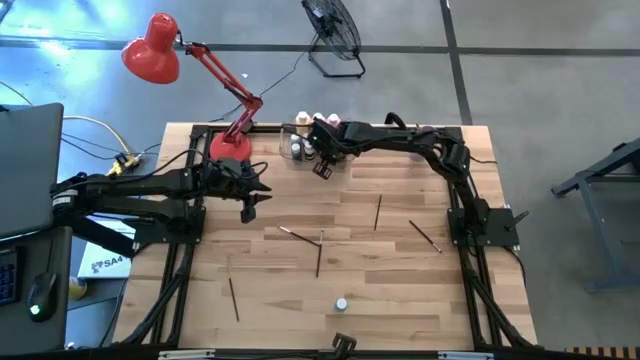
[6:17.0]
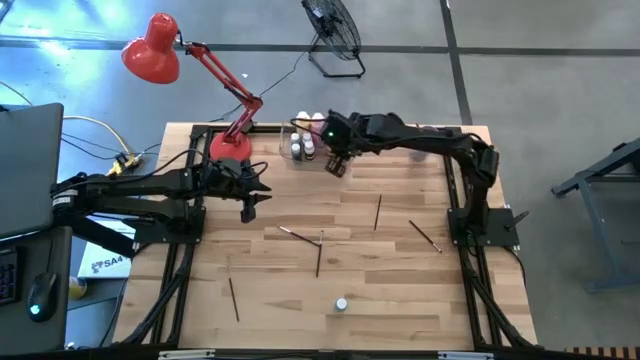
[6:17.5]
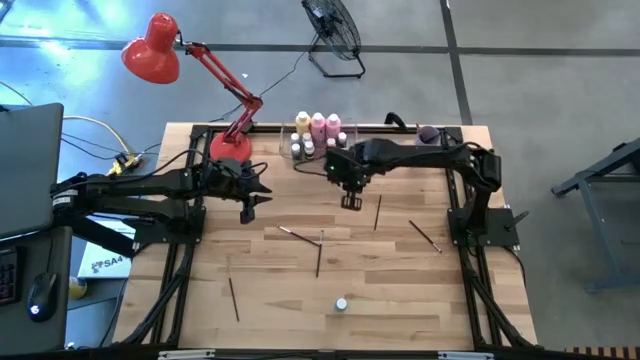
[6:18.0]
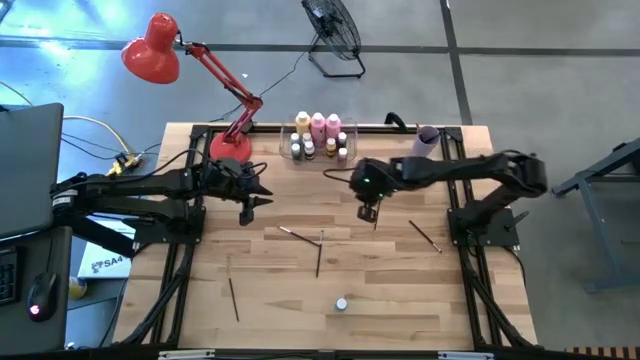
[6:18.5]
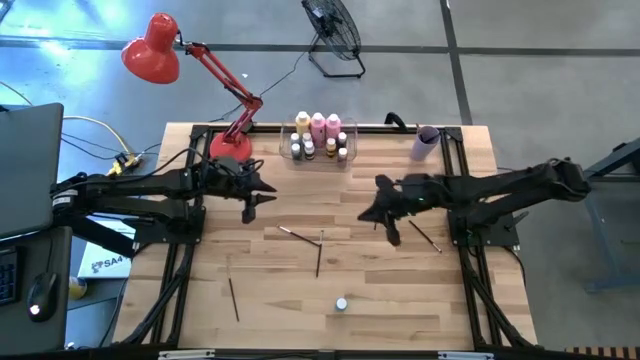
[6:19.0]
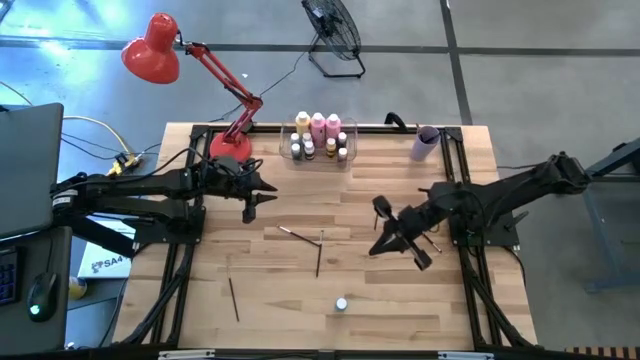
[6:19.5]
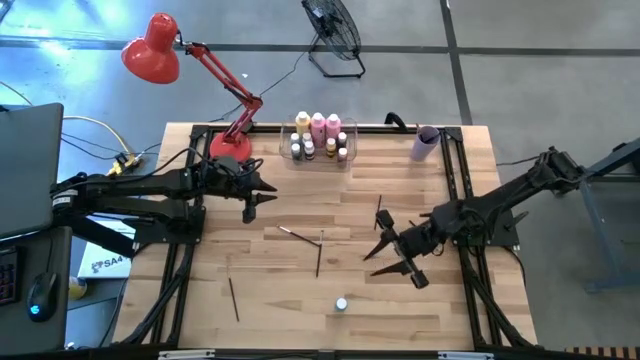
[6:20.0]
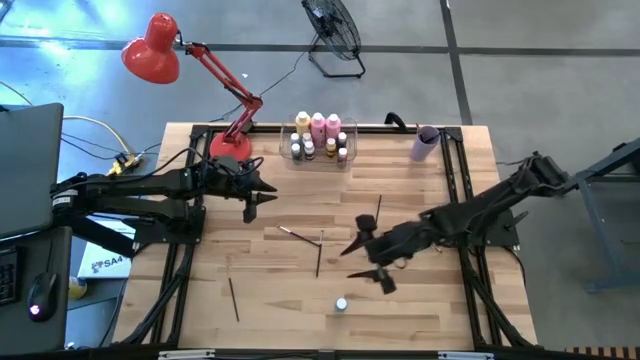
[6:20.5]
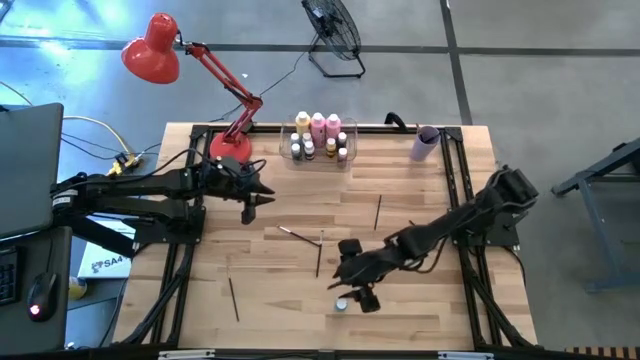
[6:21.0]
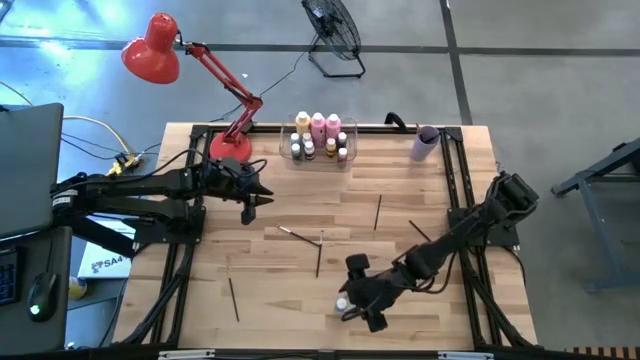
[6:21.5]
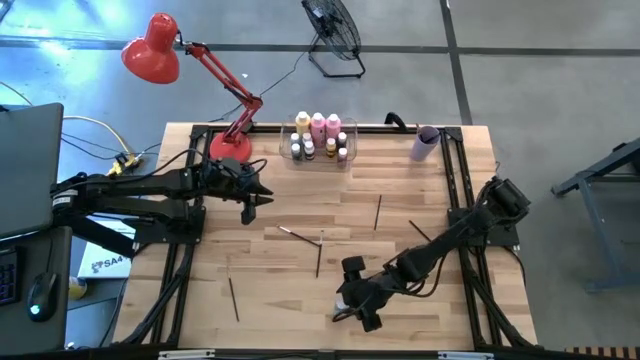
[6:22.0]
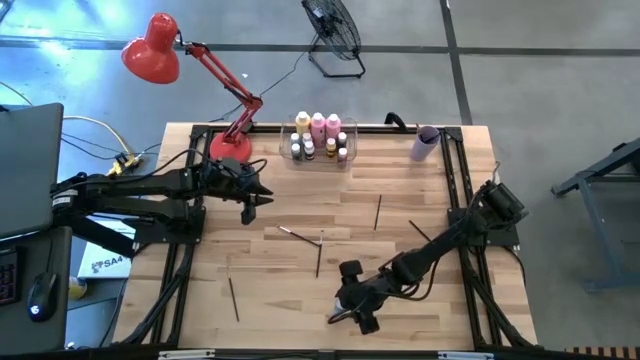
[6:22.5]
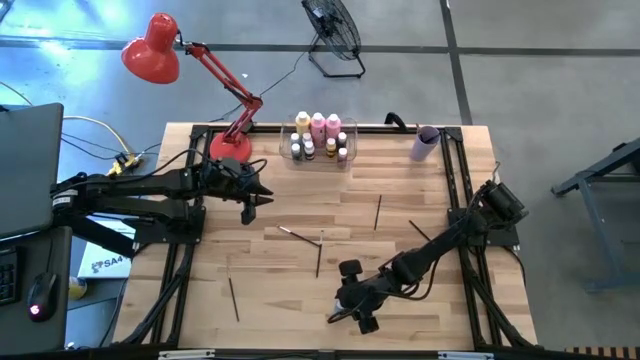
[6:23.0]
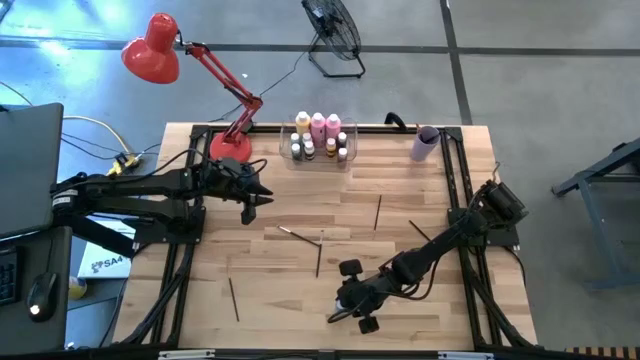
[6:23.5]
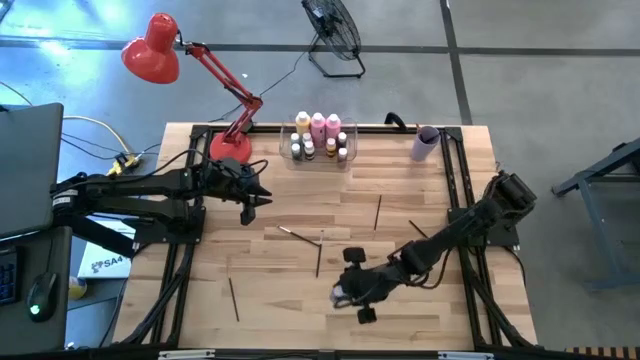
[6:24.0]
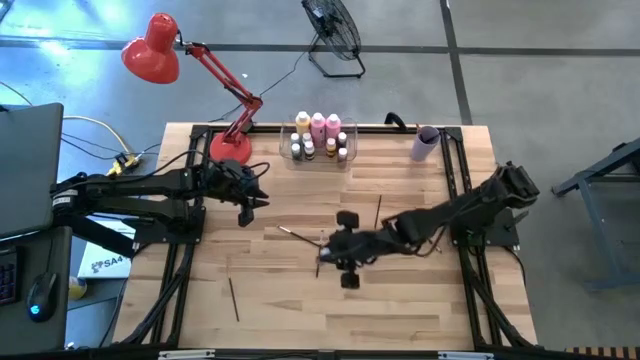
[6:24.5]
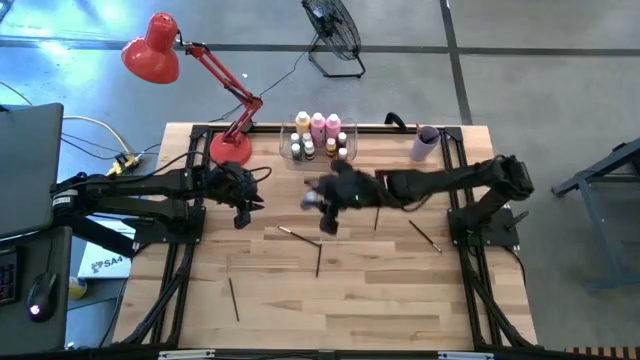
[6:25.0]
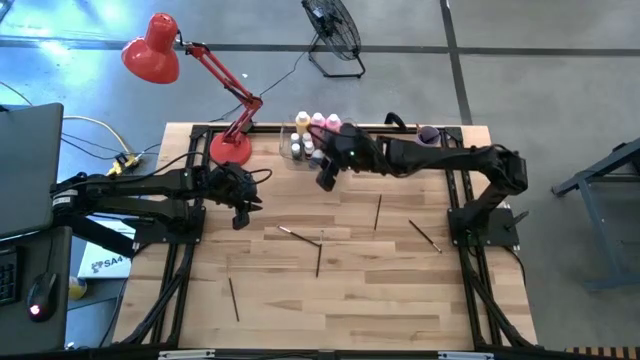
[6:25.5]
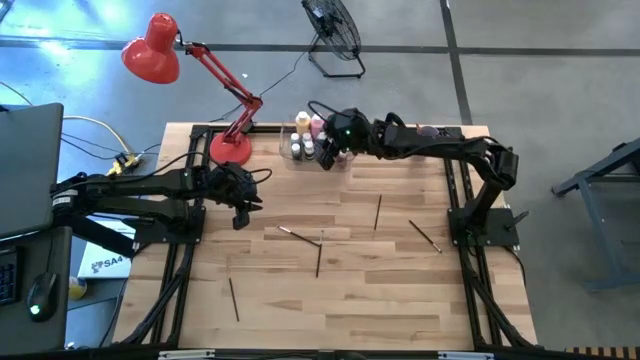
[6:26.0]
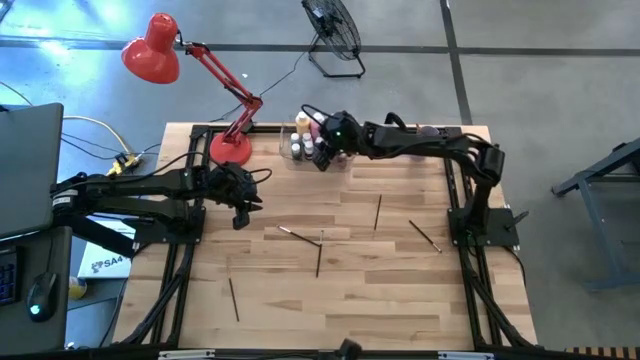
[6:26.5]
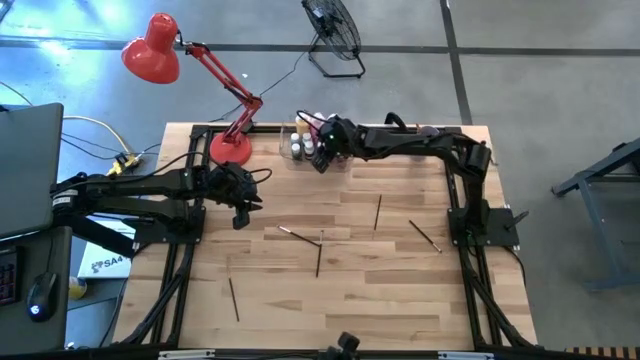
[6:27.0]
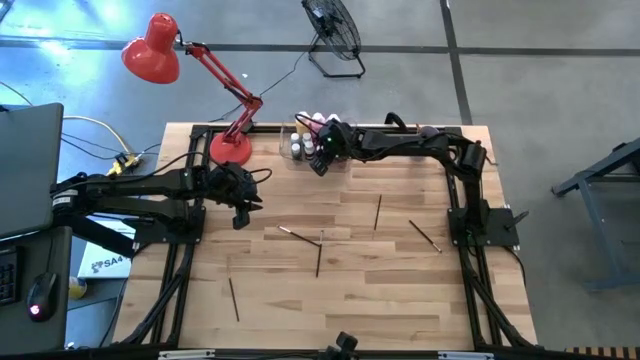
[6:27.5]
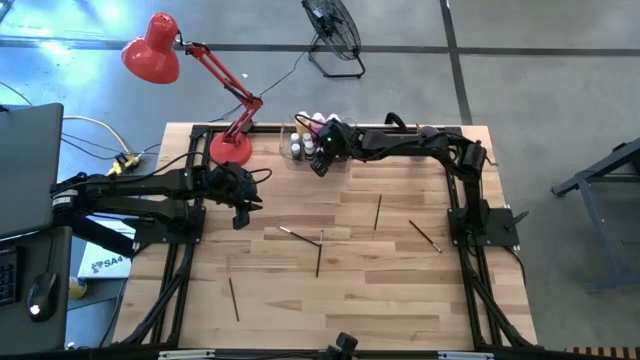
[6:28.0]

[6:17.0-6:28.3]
Task: Pick & Place Paint Supplies
Put the small light blue paint bottle into the transparent bin

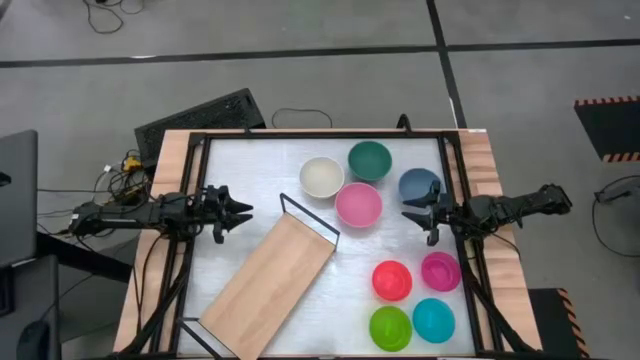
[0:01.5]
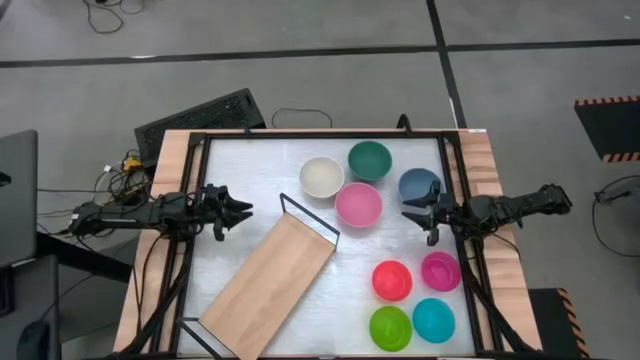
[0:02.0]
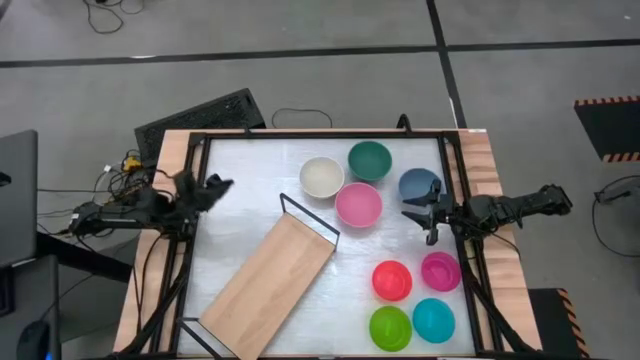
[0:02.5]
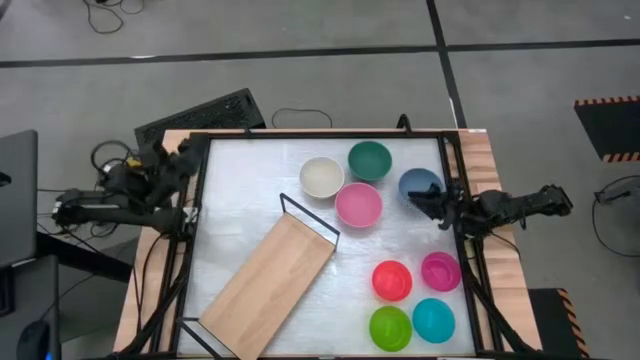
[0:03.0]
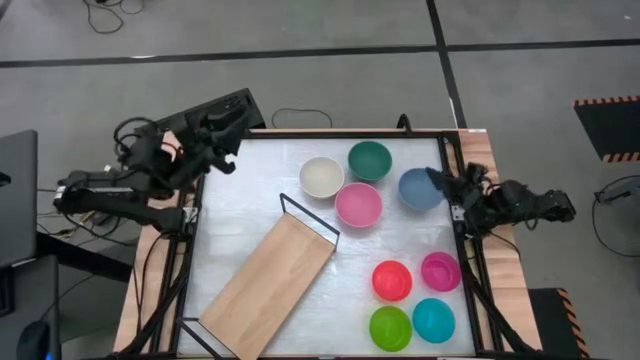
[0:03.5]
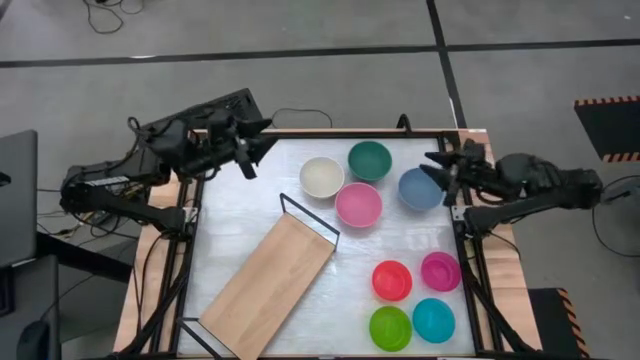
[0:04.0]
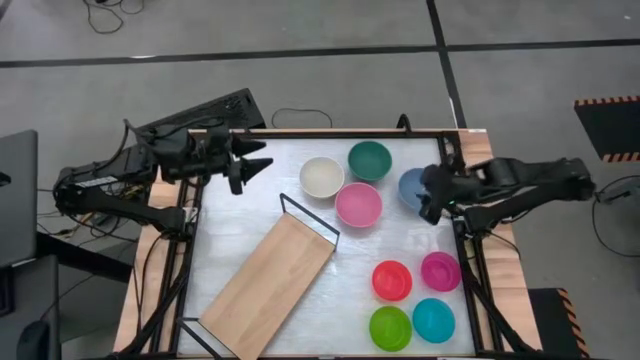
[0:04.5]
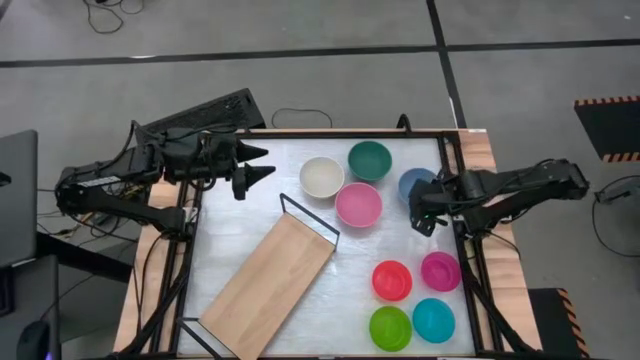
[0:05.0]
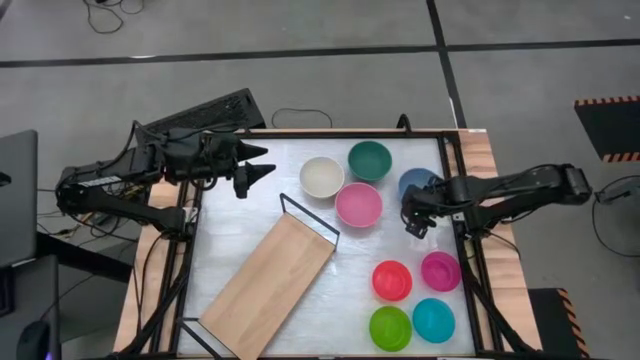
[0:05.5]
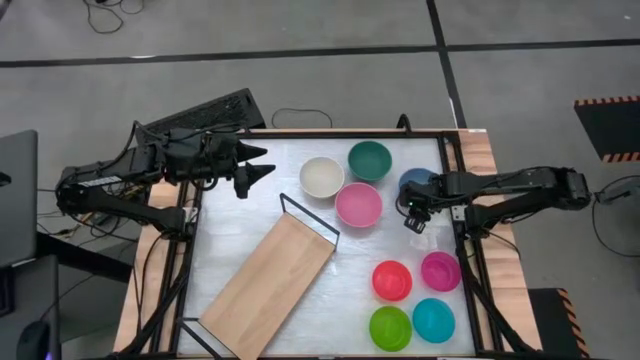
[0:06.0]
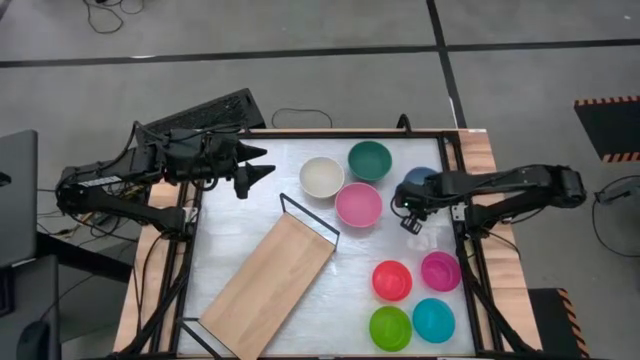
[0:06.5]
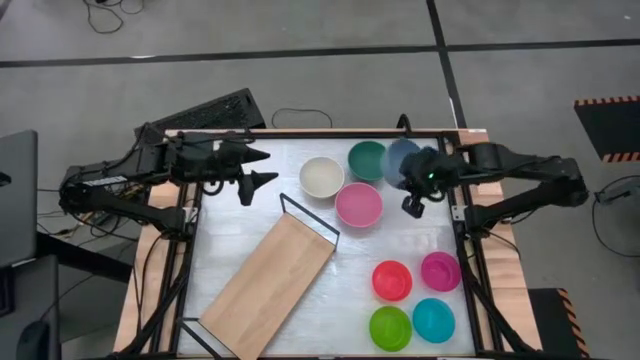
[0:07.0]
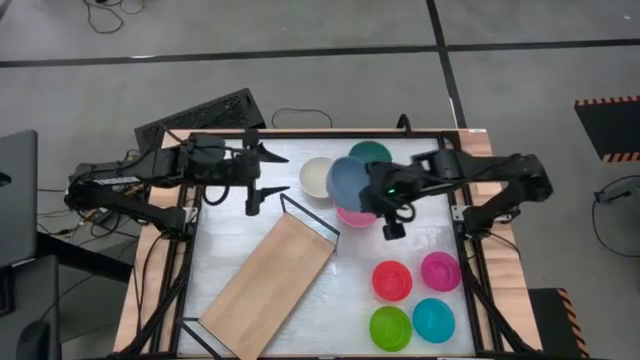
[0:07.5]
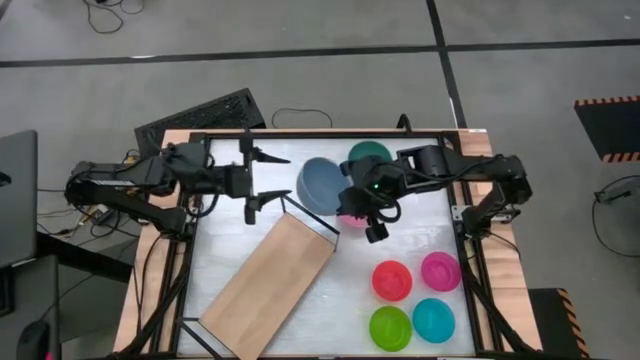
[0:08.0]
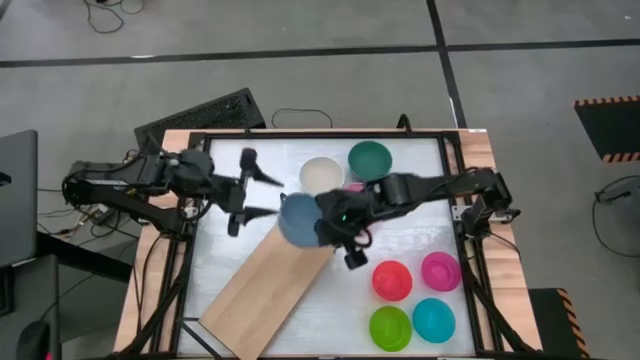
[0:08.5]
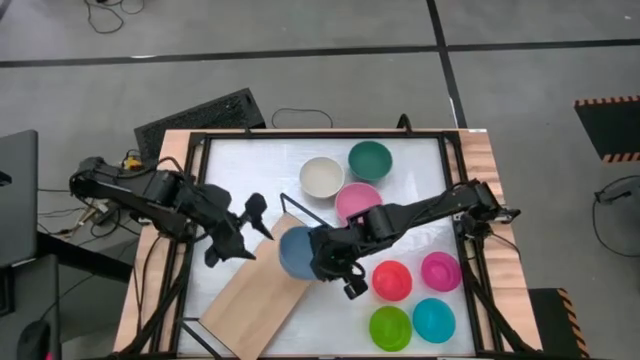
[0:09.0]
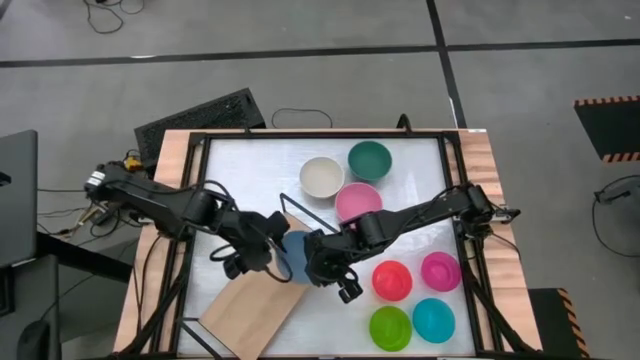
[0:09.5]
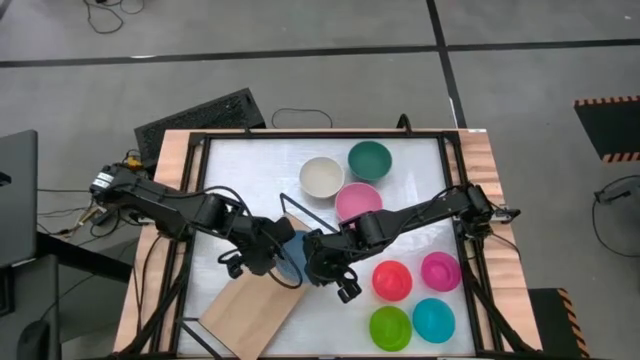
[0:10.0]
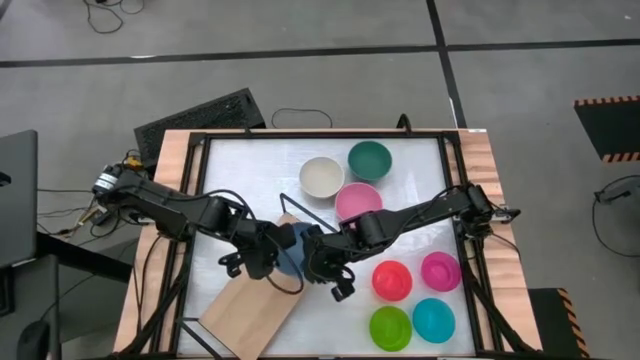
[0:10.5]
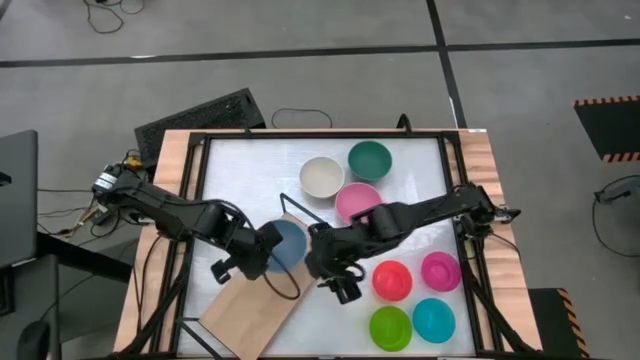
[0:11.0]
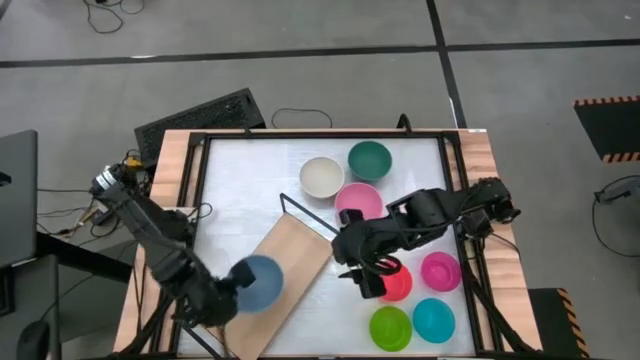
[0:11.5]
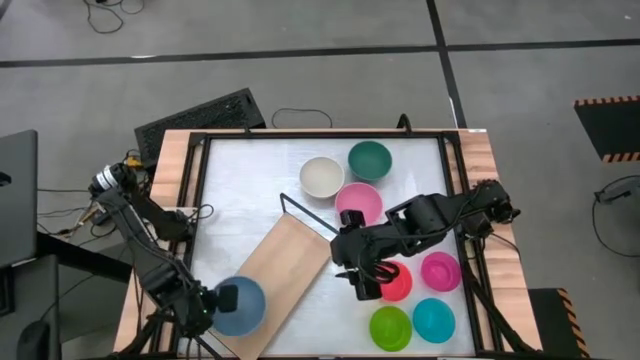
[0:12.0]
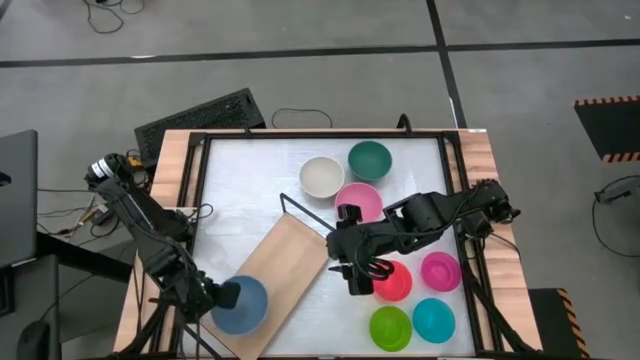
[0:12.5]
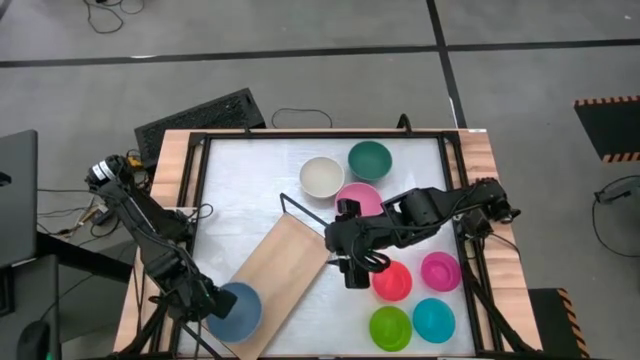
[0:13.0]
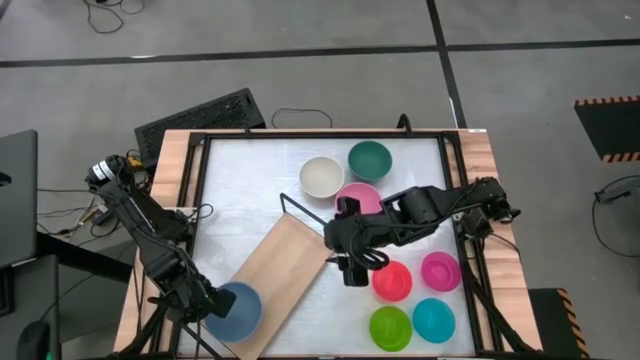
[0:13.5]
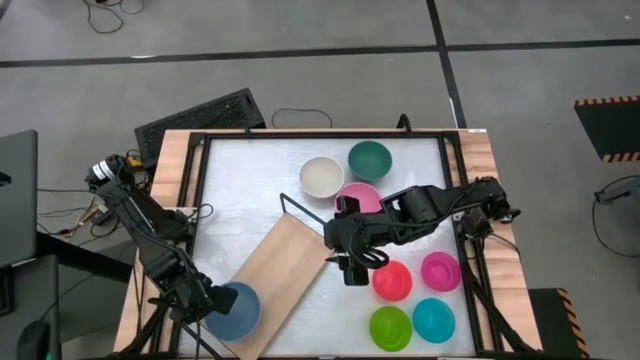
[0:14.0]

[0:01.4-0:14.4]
Task: Place and stack bowls onto a shelf
Put the big blue bowl on the shelf
